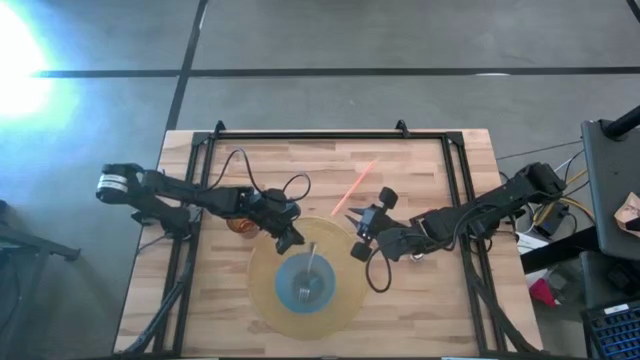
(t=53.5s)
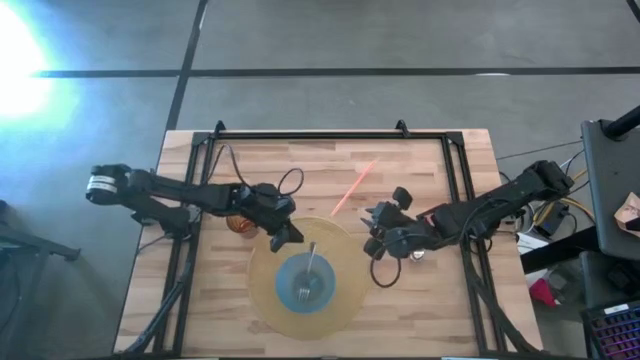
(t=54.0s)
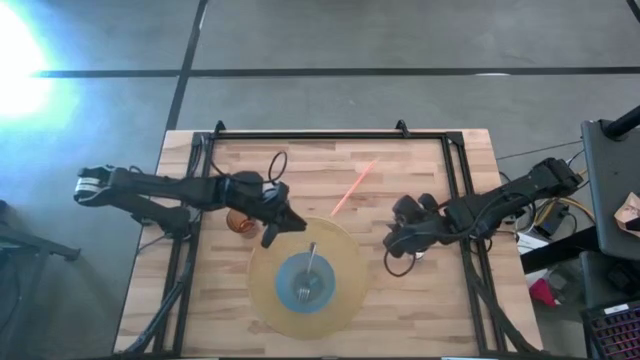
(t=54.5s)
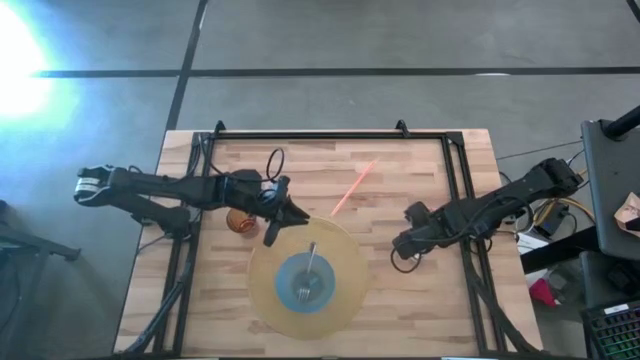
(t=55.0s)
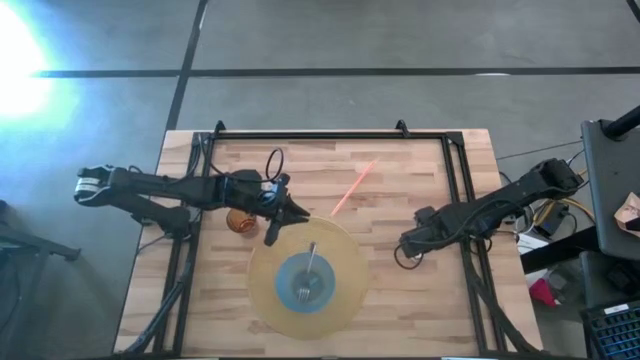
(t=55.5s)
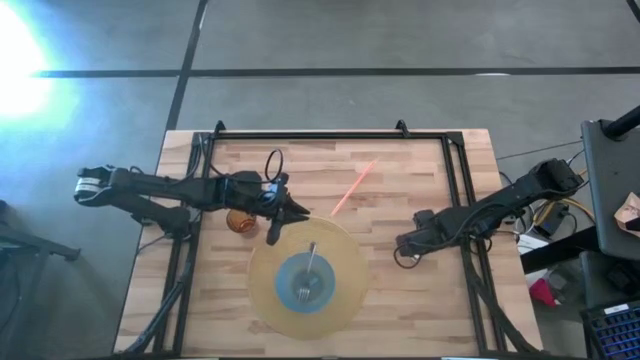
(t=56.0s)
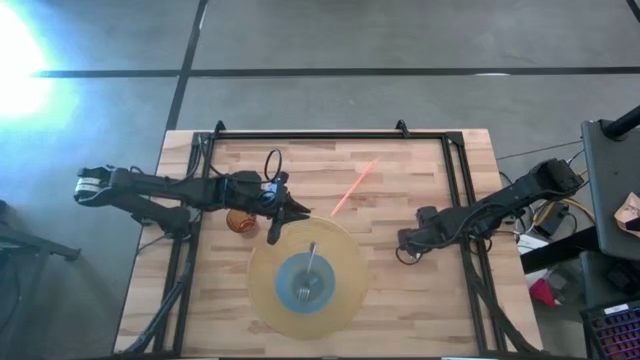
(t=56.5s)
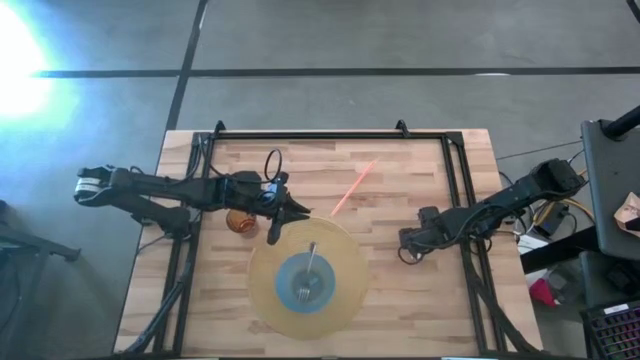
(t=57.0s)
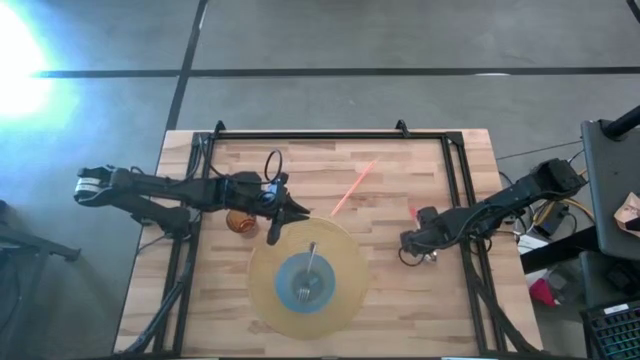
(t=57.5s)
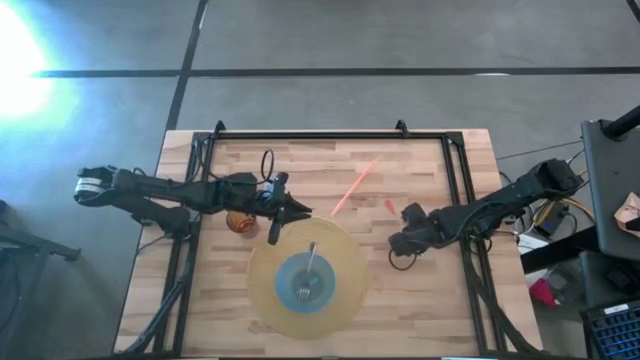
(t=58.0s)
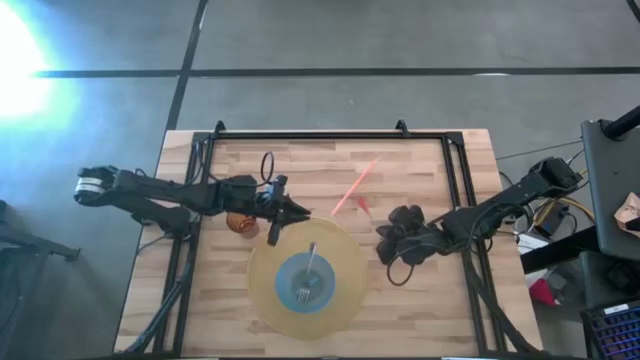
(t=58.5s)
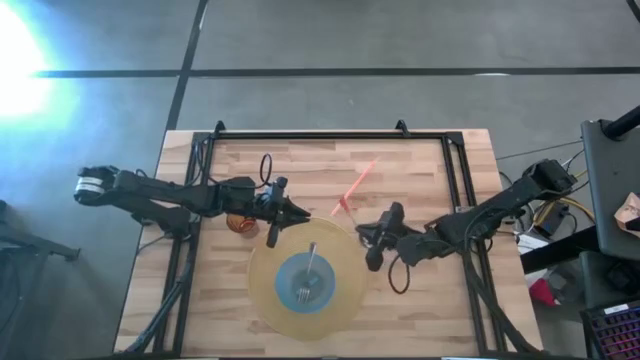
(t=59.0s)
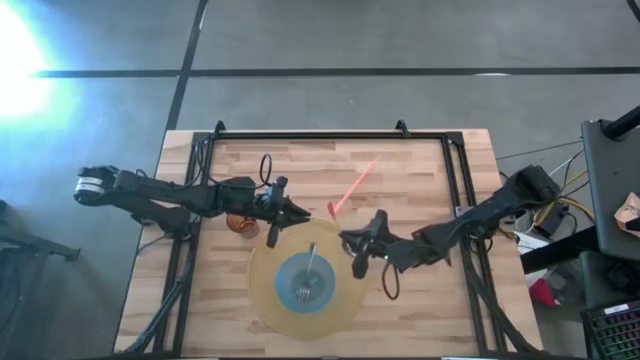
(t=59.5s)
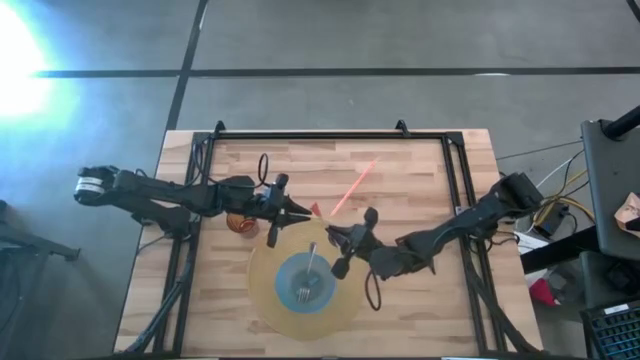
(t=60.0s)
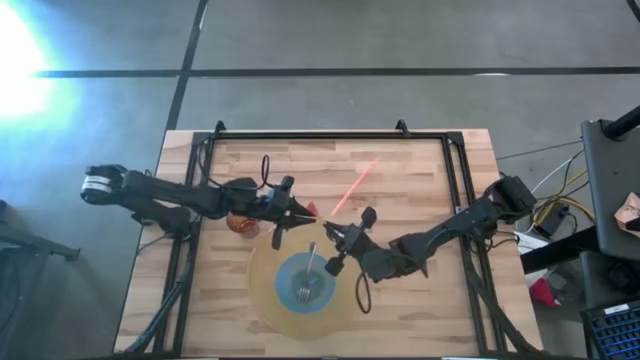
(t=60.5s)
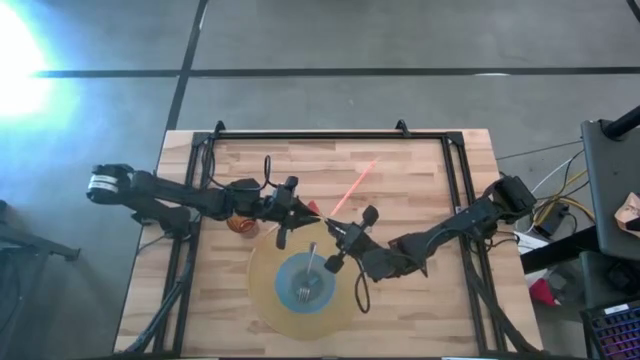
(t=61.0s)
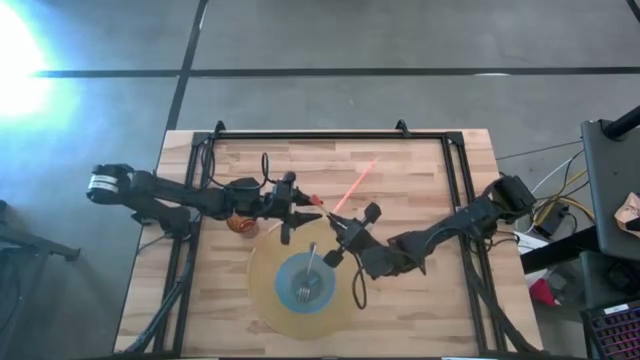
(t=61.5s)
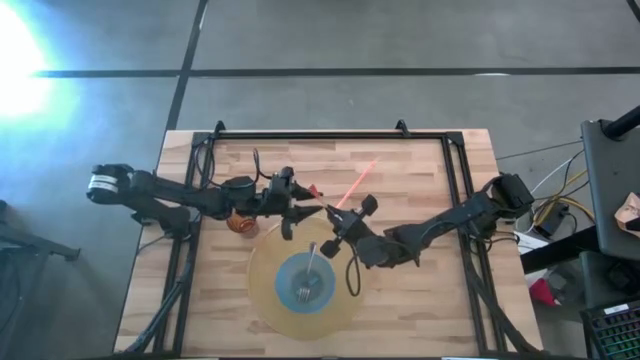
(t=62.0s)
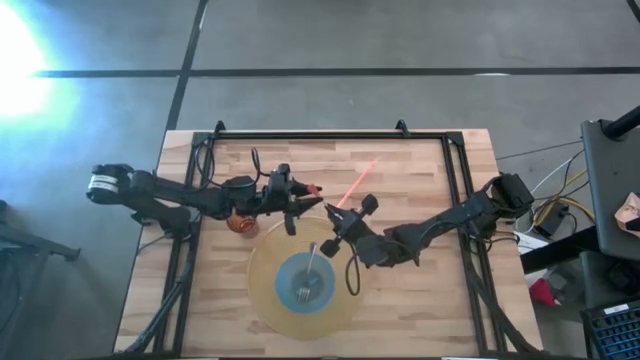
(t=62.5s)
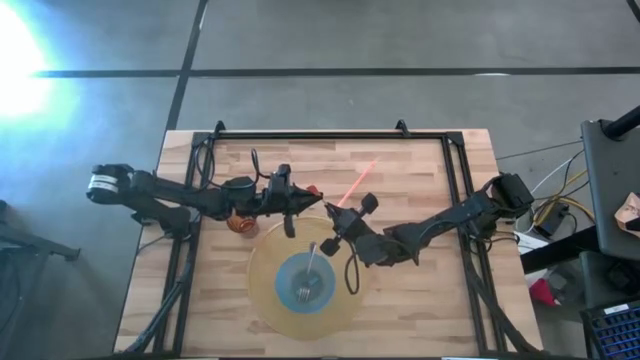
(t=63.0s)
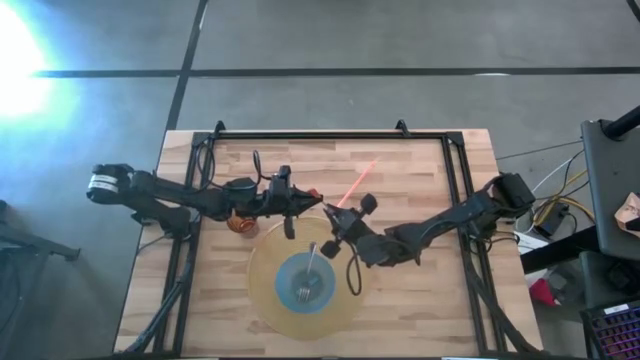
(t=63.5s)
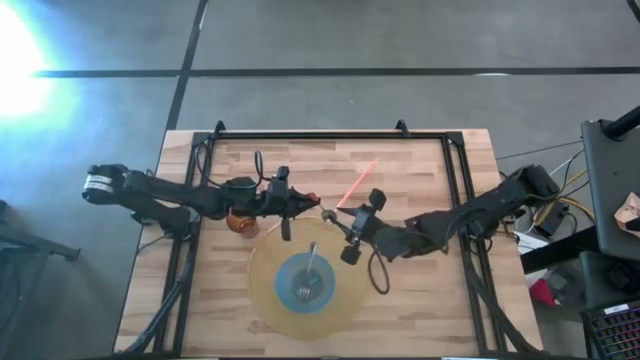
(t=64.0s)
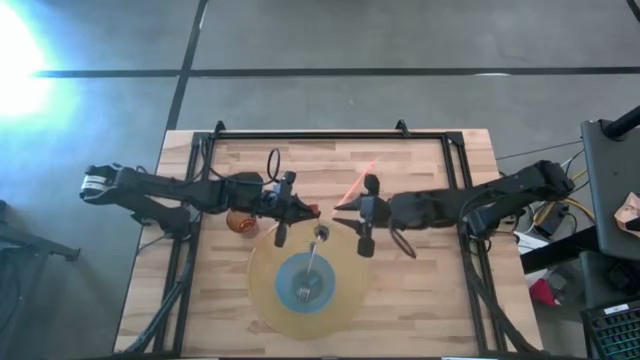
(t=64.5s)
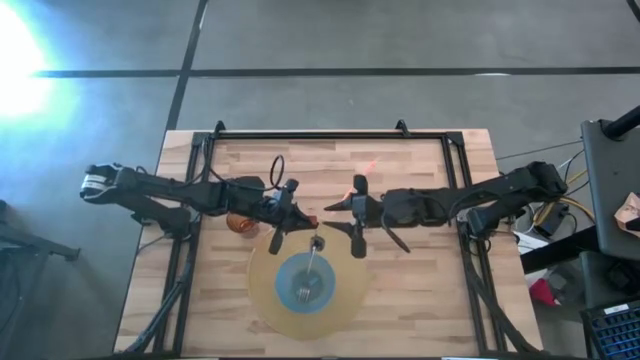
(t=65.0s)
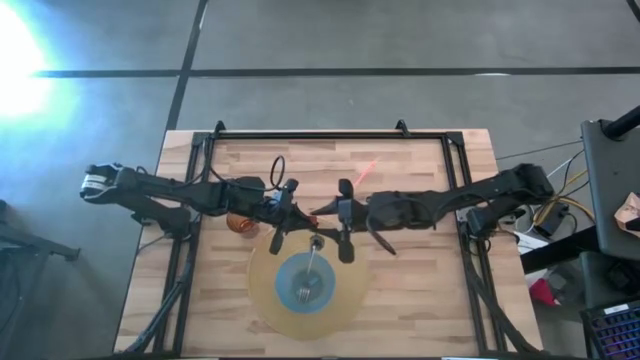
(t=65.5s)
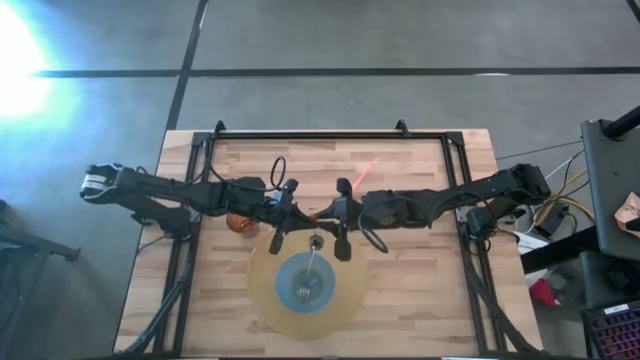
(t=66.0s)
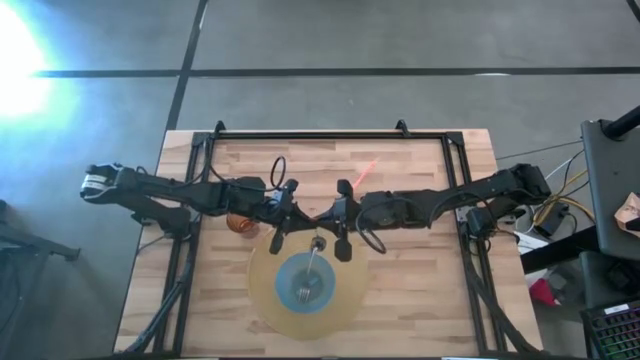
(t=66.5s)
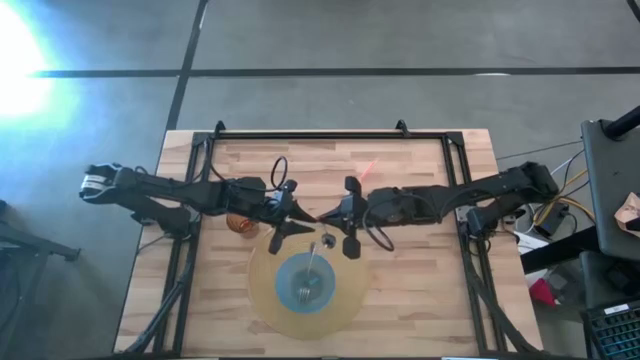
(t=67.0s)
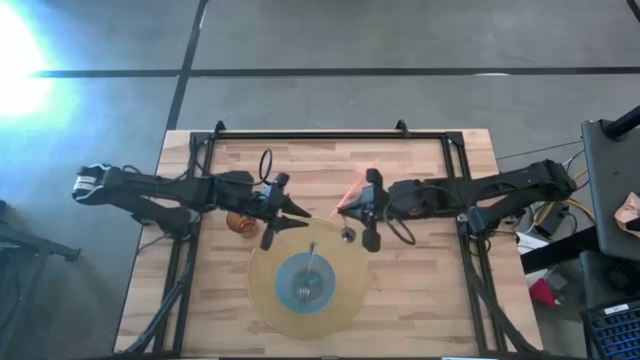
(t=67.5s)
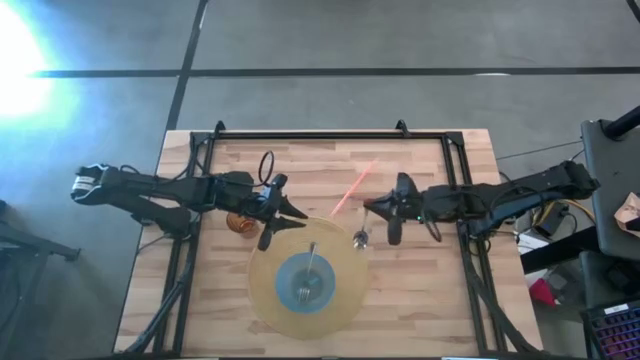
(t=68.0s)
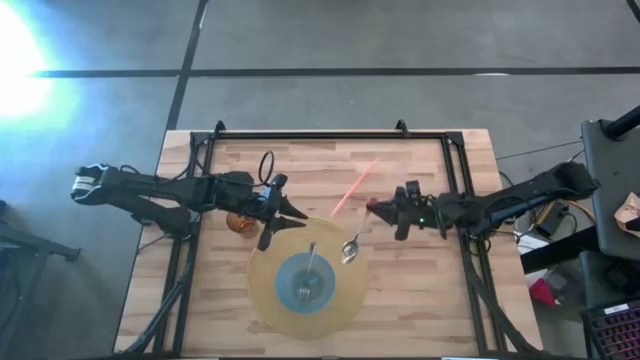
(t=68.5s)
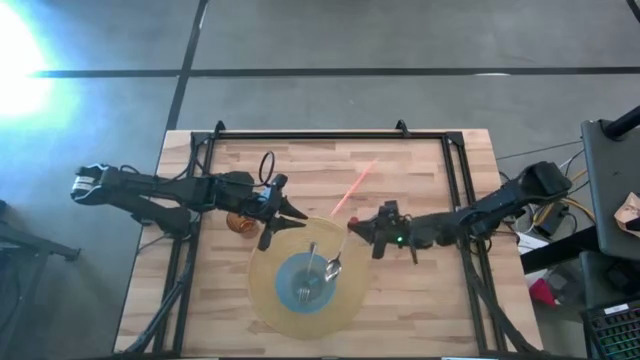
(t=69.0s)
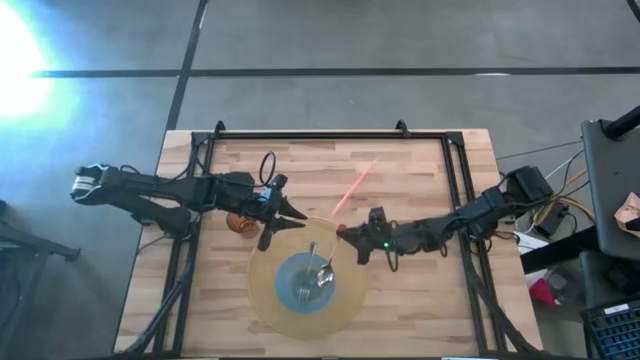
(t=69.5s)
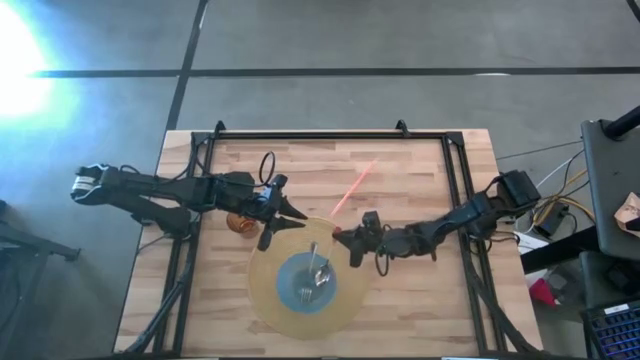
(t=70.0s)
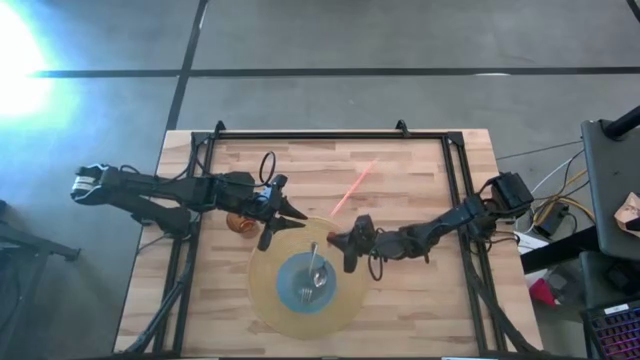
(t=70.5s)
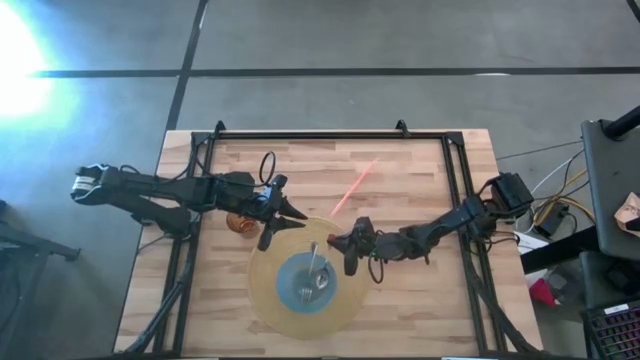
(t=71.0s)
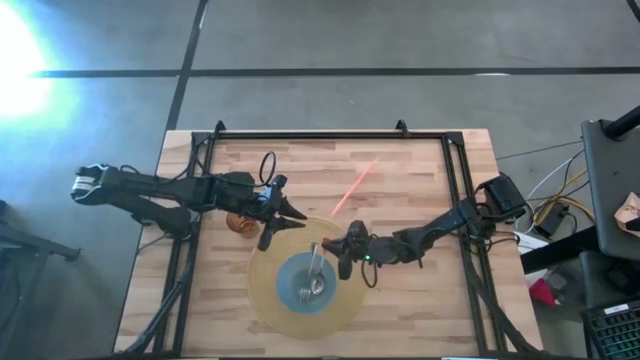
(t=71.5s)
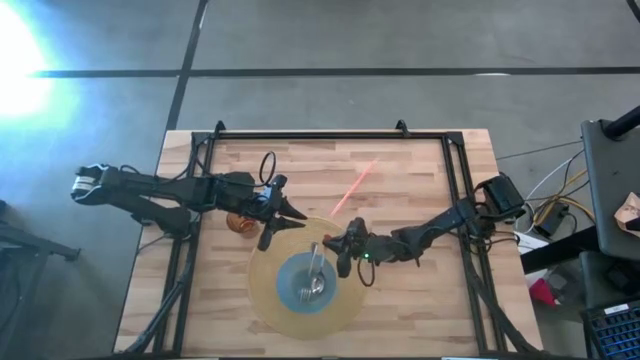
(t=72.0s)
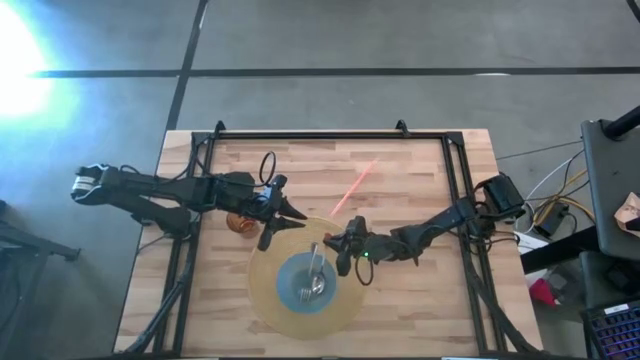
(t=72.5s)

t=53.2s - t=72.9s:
Task: Pick & Place Utensil
Put the orange spoon into the blue bowl on the brown mat
